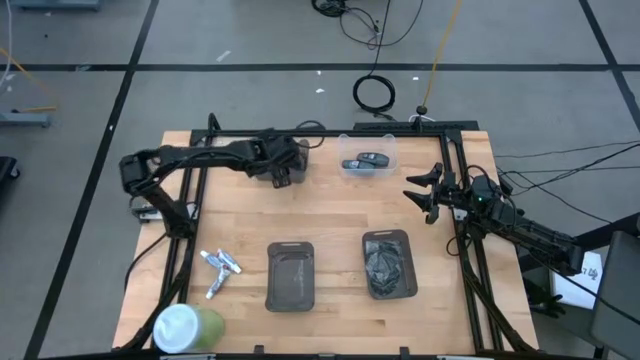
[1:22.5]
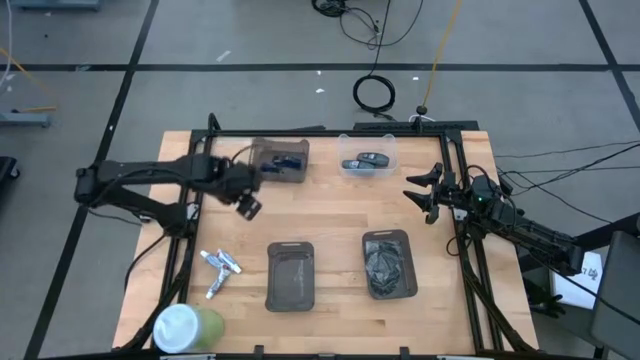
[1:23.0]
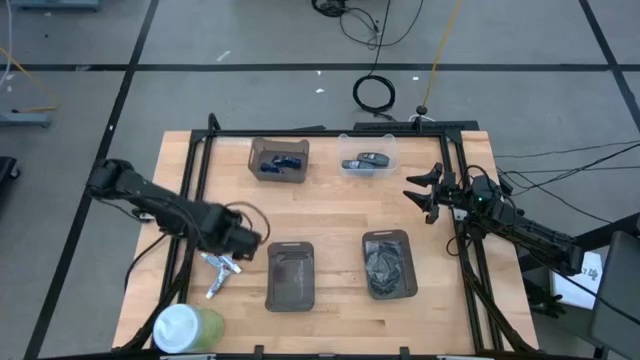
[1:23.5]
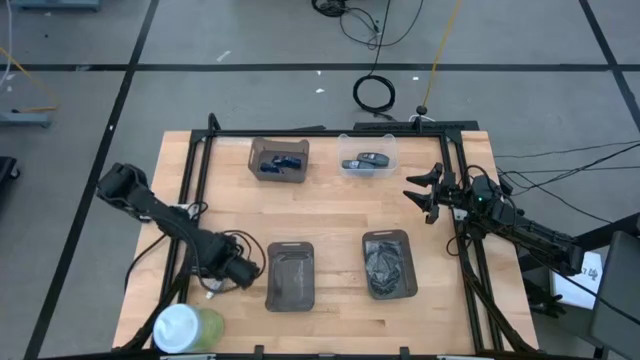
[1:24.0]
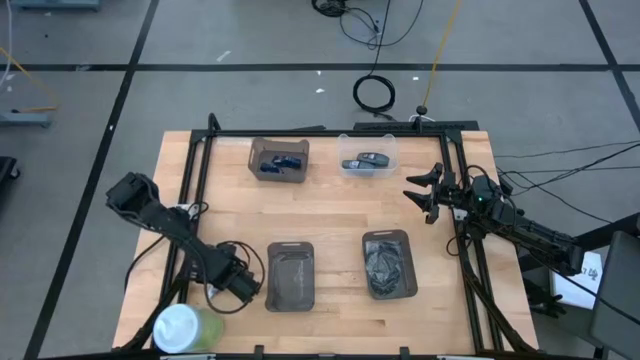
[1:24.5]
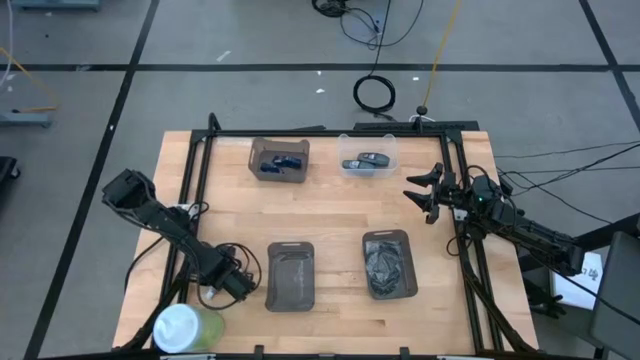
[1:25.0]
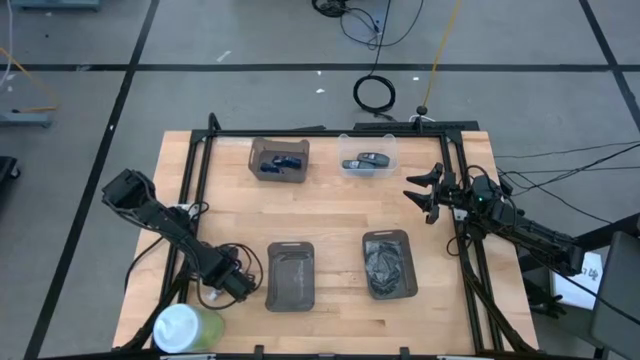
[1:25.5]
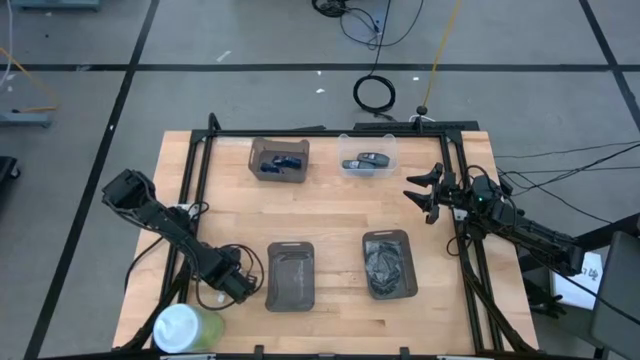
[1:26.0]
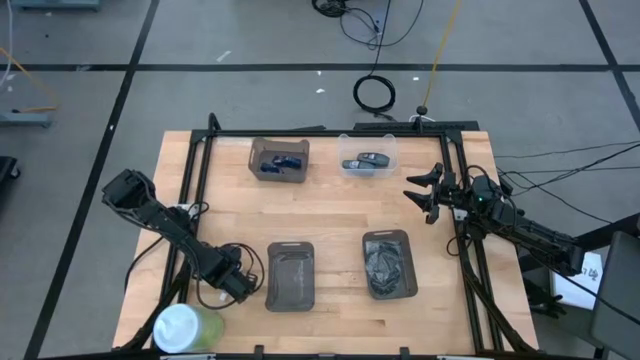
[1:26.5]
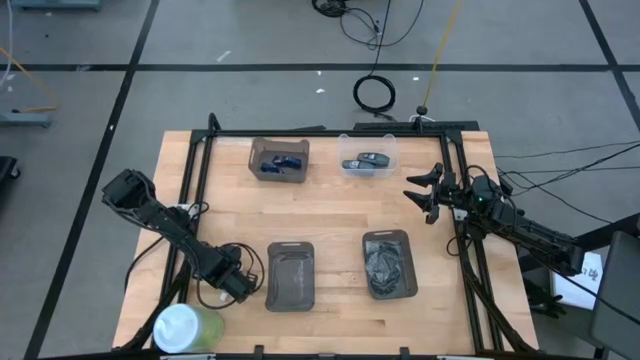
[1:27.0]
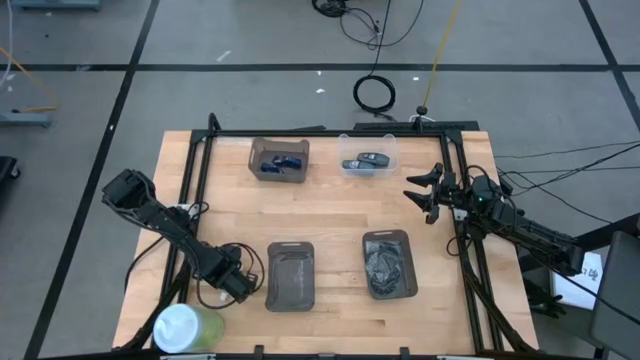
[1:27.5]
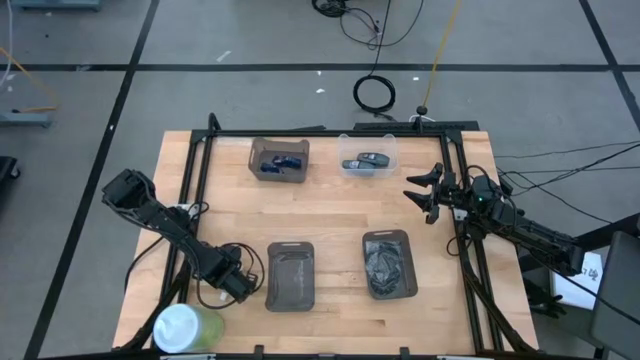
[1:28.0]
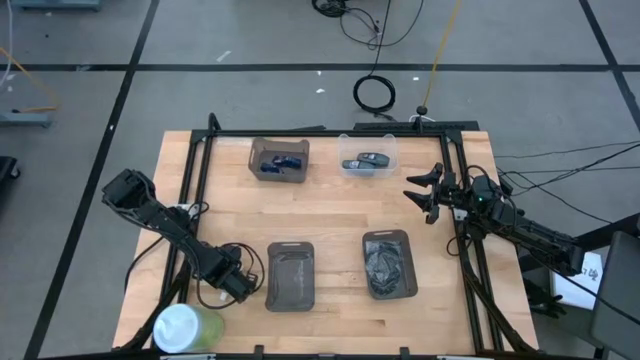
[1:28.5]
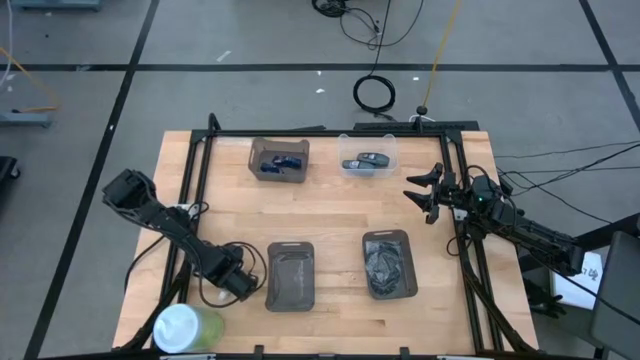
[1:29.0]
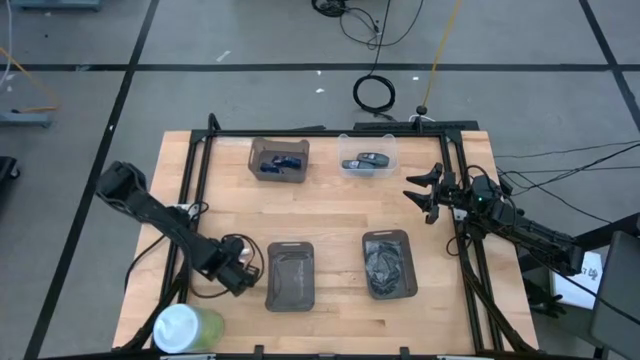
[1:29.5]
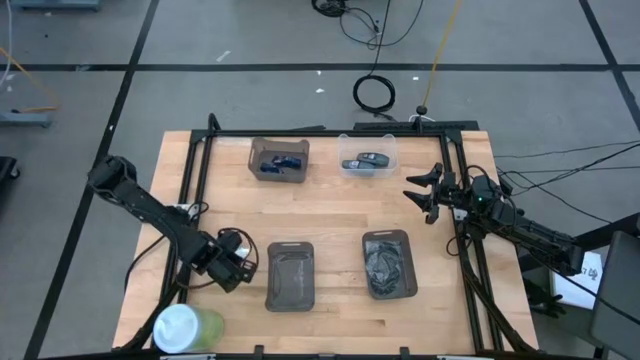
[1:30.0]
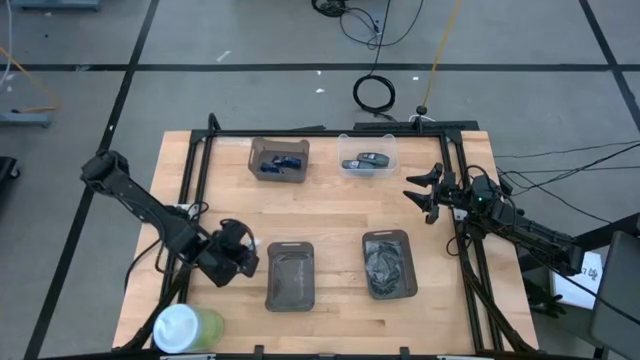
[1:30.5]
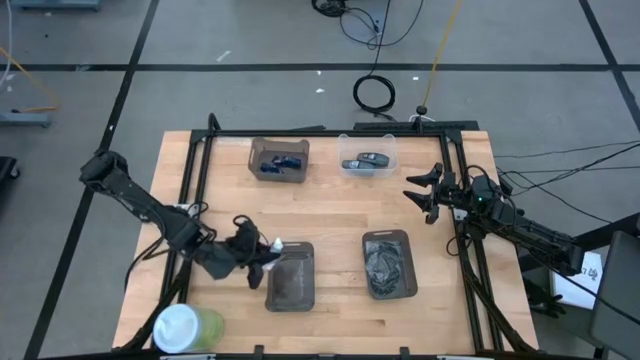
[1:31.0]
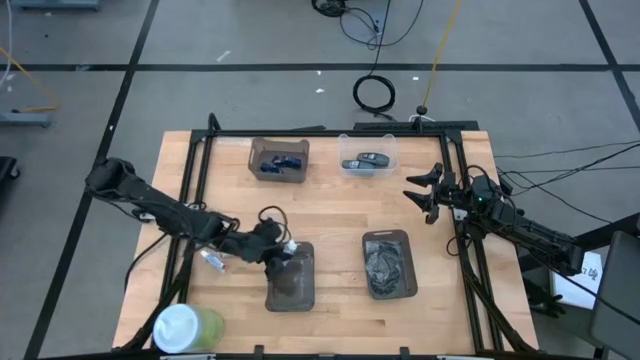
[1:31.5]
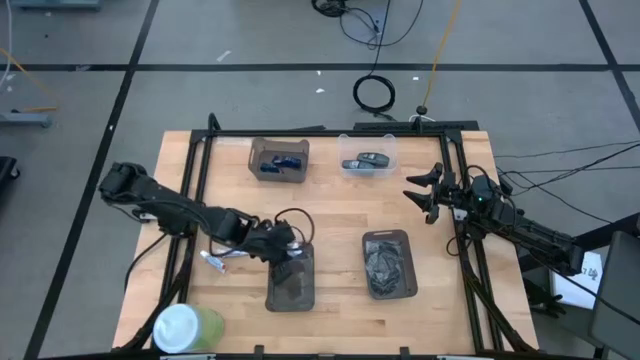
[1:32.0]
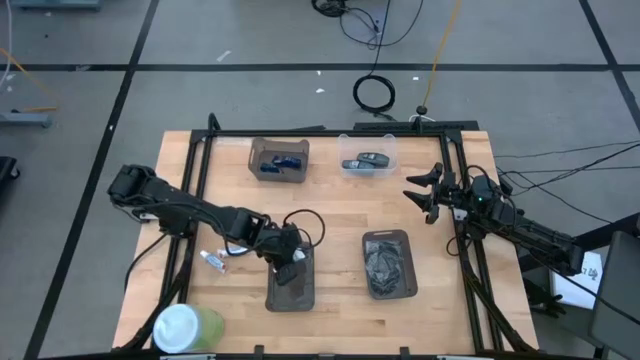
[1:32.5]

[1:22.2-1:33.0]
Task: Pick & Place Travel size toiletries
Put the bottom white toothpaste into the bottom left black bin

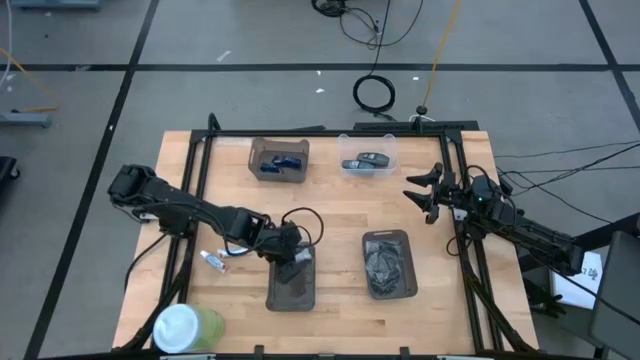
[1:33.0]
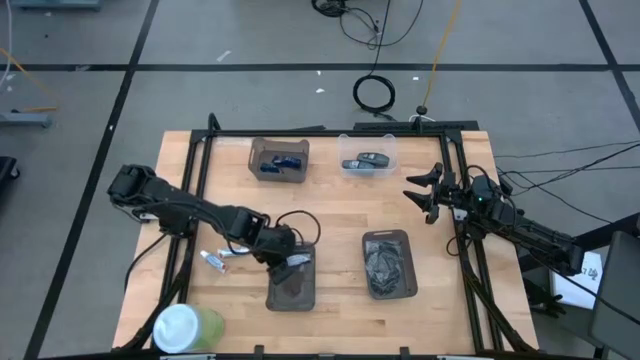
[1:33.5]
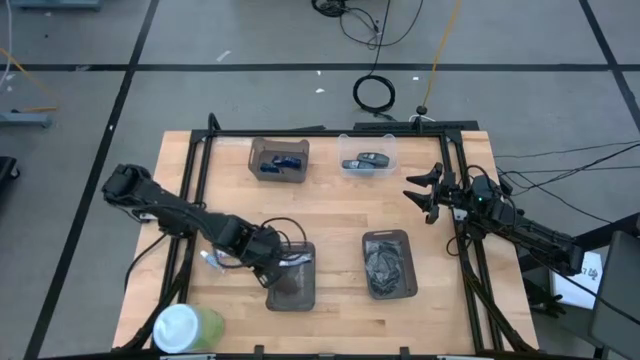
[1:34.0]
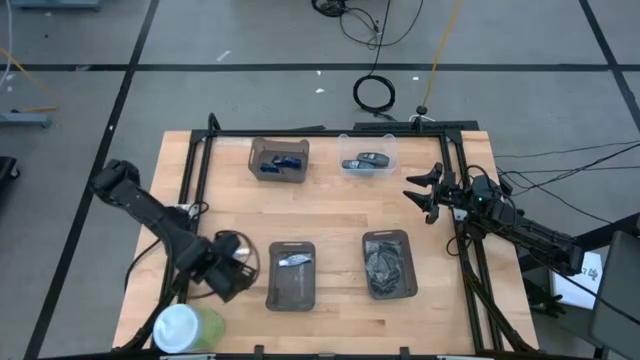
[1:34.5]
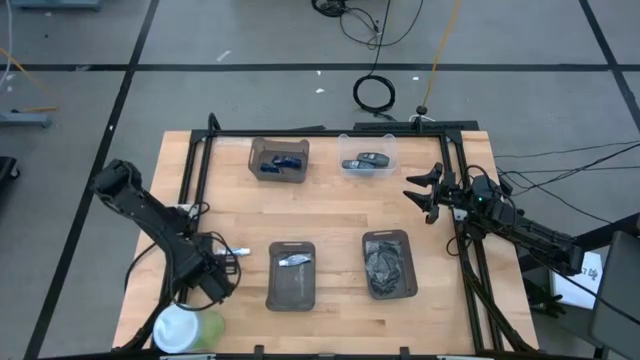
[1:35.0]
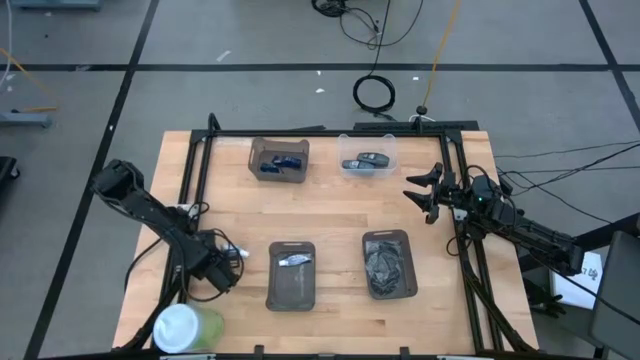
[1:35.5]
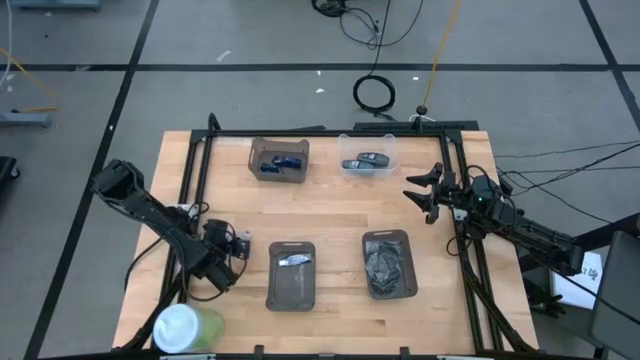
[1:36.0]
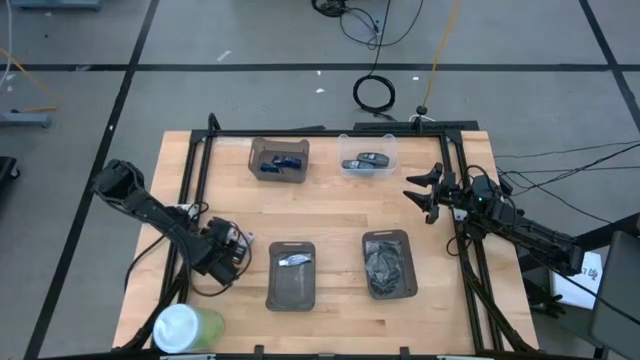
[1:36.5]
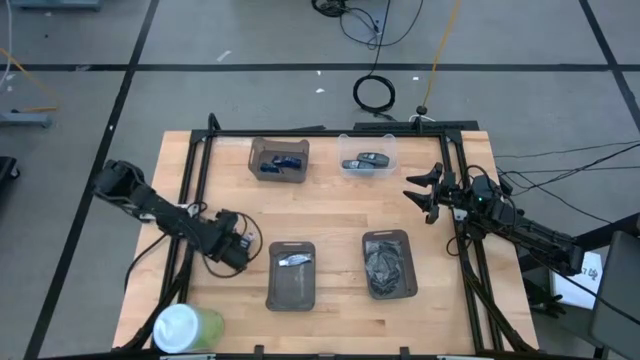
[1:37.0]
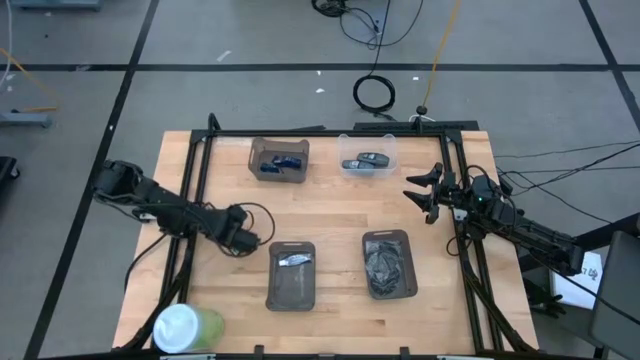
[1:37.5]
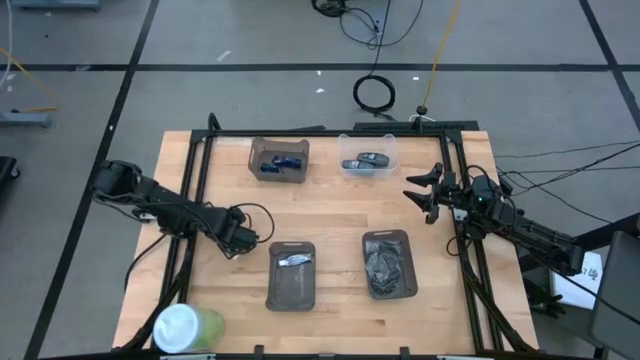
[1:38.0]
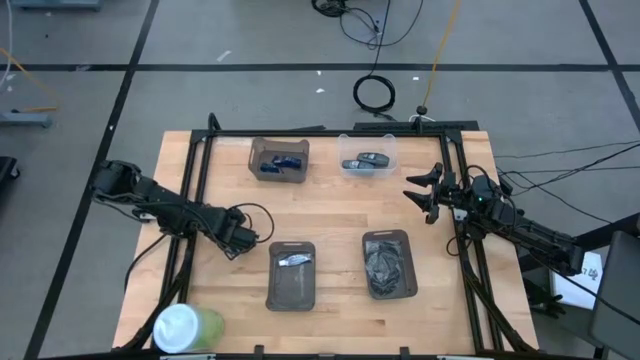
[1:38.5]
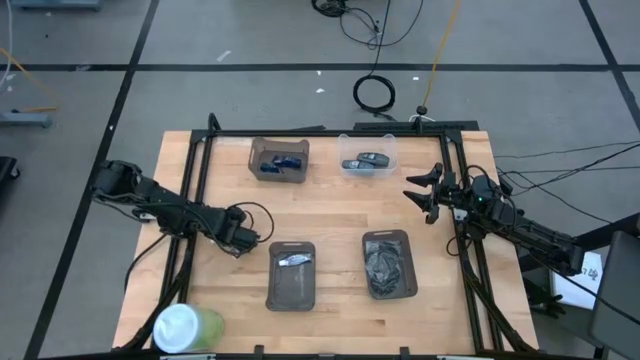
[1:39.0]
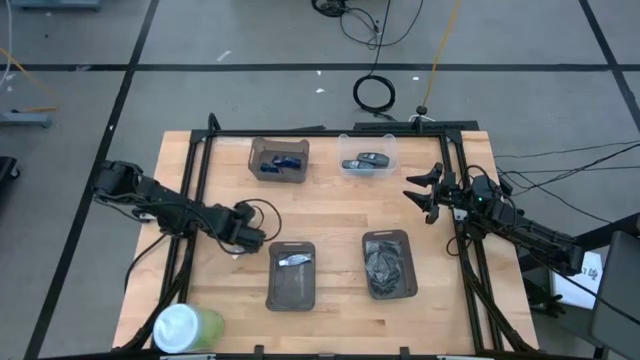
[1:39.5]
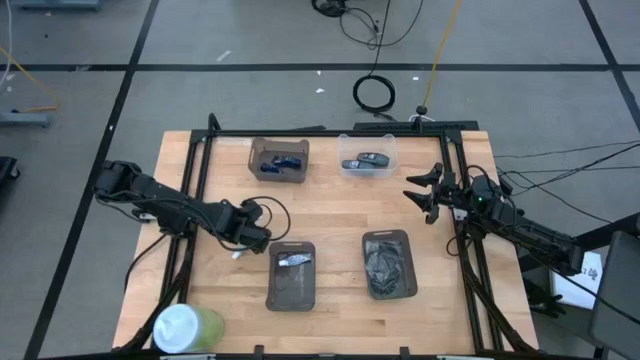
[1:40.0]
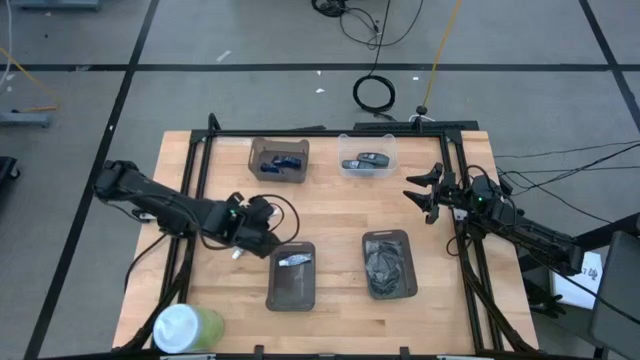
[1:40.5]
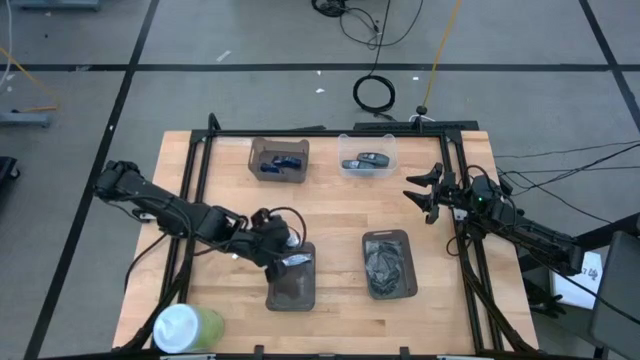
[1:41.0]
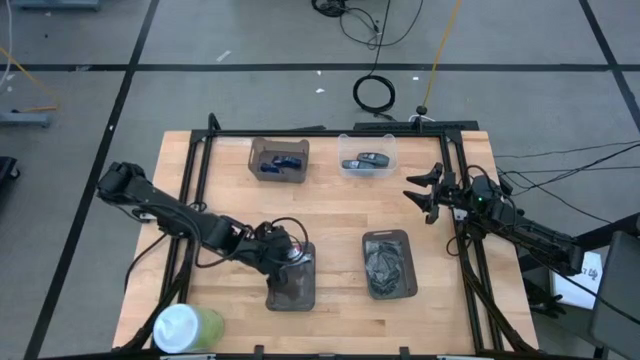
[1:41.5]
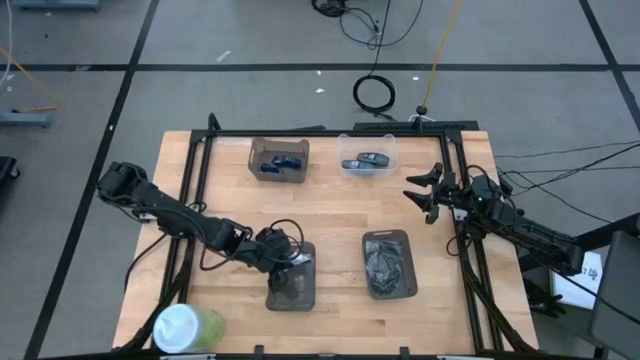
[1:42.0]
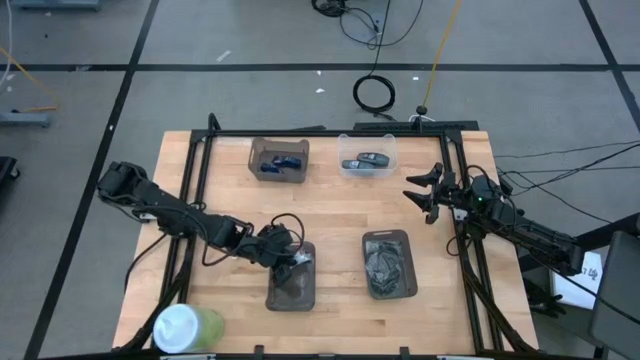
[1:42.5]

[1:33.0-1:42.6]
Put the left white toothpaste into the bottom left black bin
